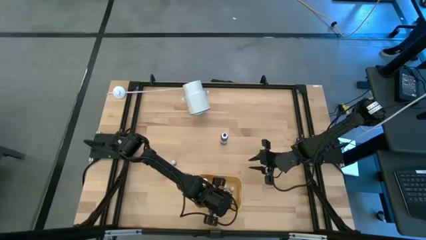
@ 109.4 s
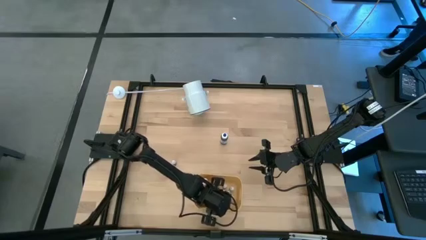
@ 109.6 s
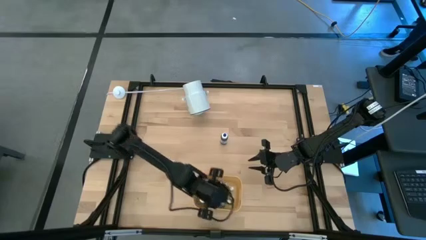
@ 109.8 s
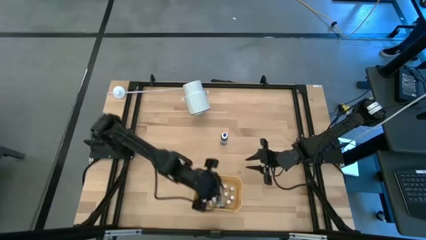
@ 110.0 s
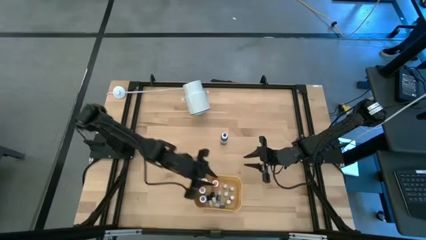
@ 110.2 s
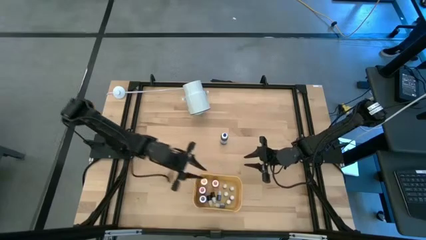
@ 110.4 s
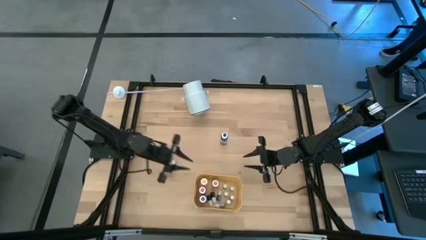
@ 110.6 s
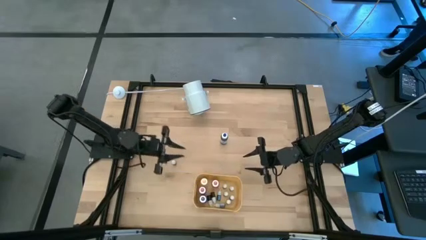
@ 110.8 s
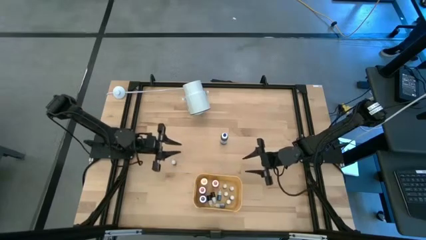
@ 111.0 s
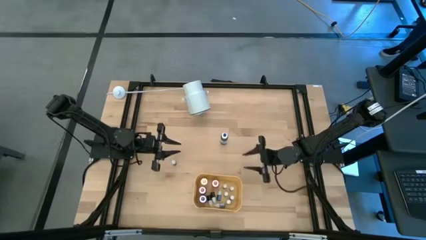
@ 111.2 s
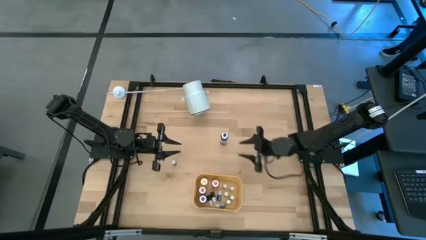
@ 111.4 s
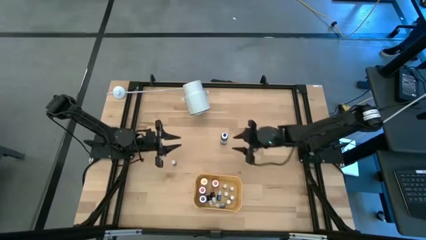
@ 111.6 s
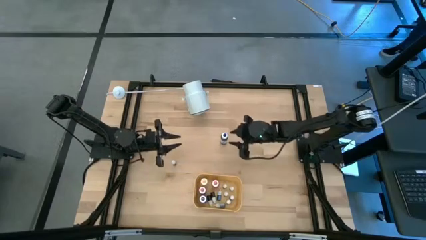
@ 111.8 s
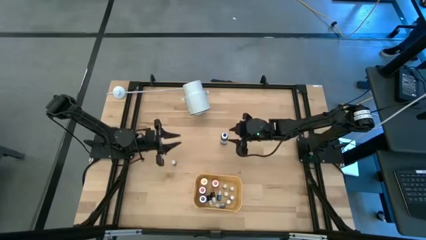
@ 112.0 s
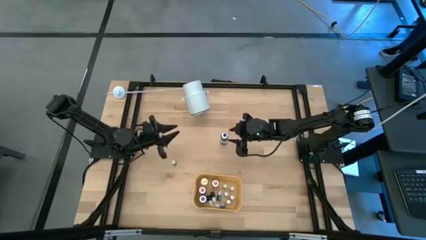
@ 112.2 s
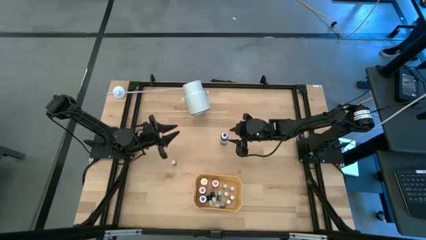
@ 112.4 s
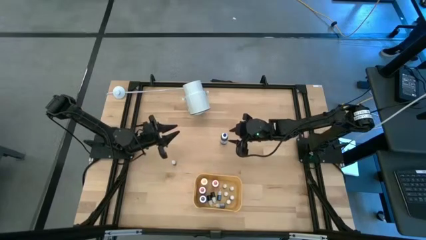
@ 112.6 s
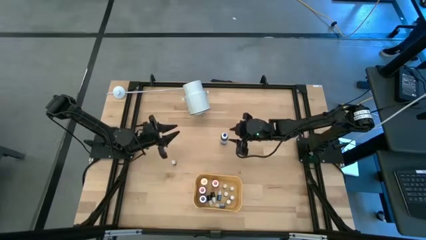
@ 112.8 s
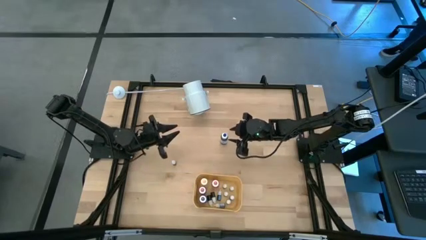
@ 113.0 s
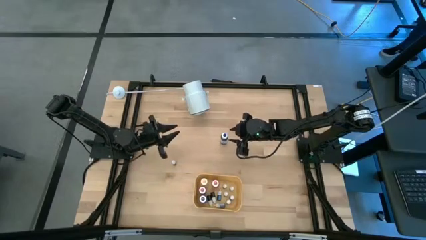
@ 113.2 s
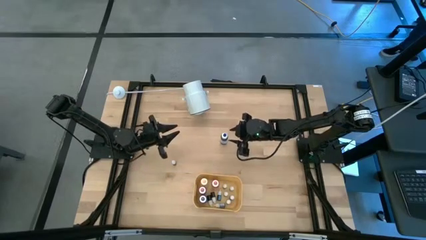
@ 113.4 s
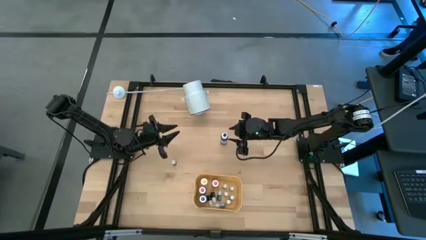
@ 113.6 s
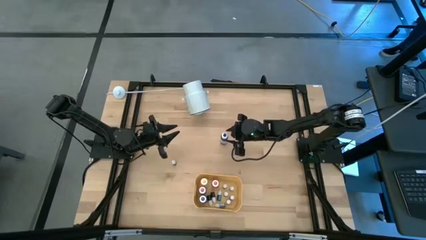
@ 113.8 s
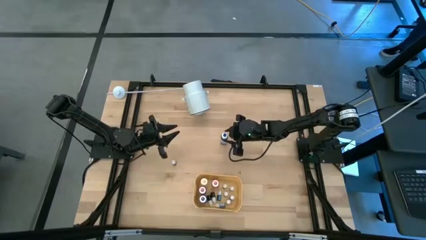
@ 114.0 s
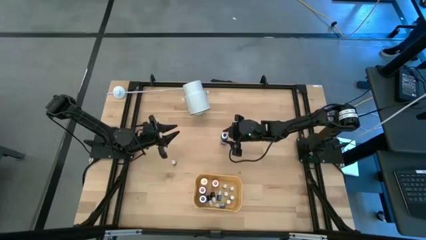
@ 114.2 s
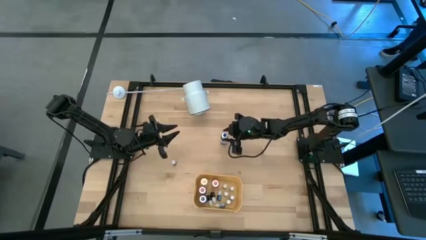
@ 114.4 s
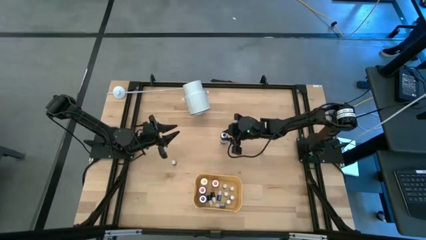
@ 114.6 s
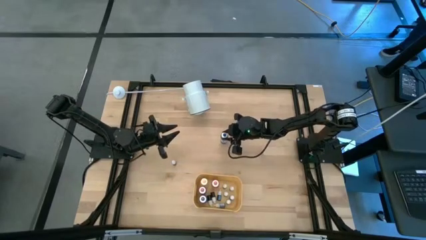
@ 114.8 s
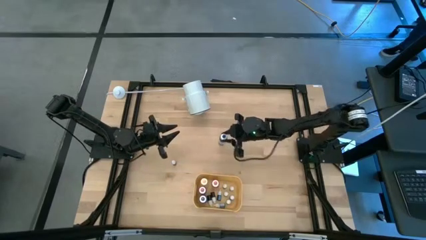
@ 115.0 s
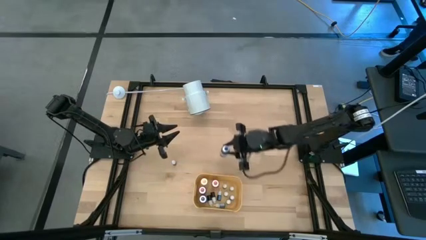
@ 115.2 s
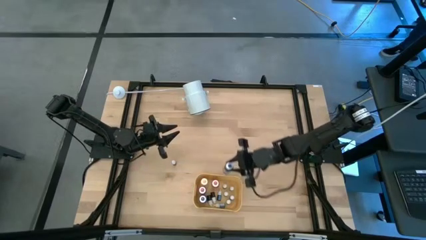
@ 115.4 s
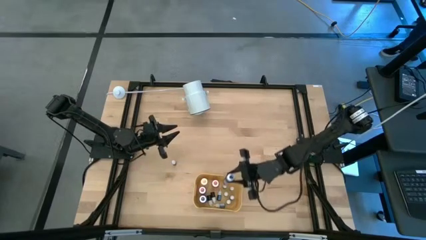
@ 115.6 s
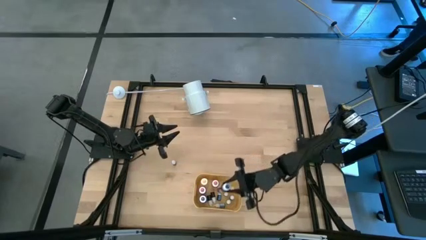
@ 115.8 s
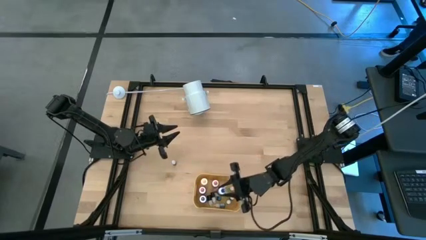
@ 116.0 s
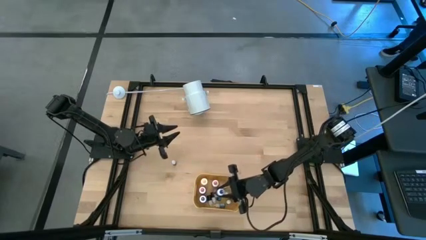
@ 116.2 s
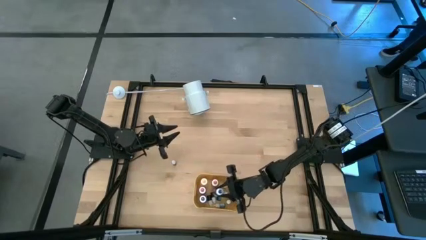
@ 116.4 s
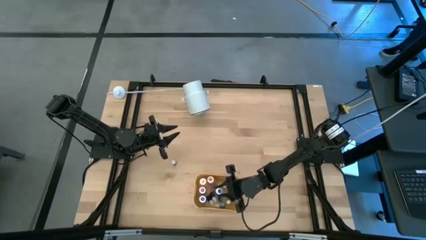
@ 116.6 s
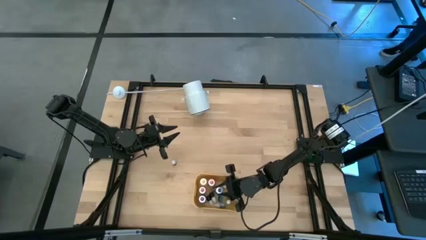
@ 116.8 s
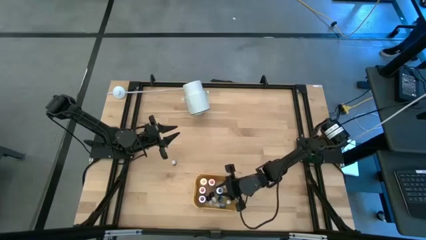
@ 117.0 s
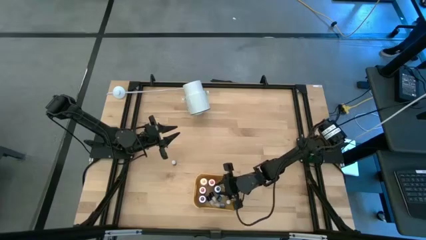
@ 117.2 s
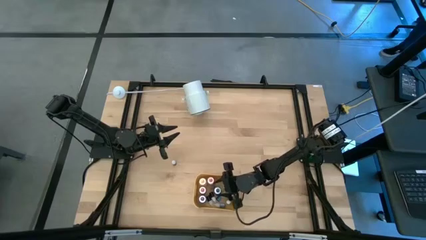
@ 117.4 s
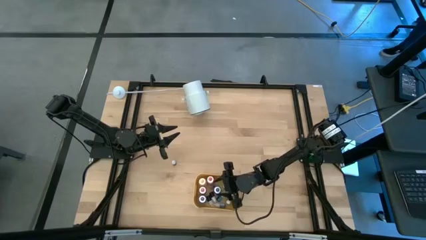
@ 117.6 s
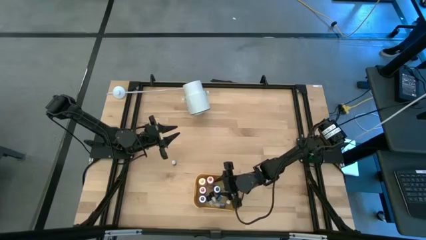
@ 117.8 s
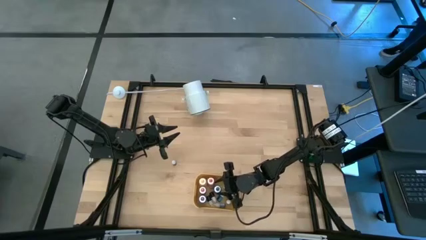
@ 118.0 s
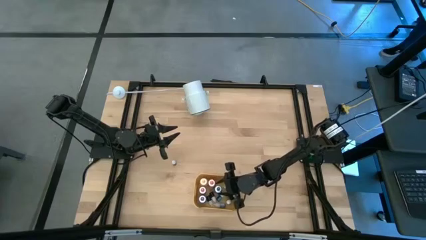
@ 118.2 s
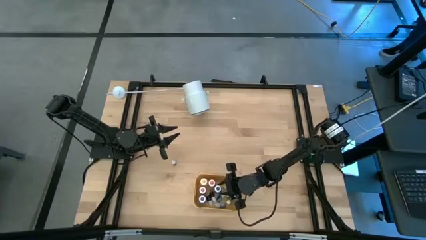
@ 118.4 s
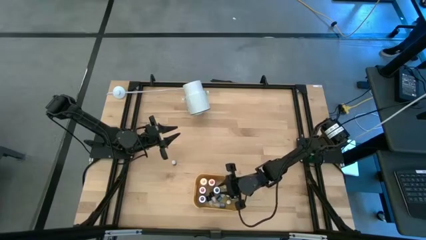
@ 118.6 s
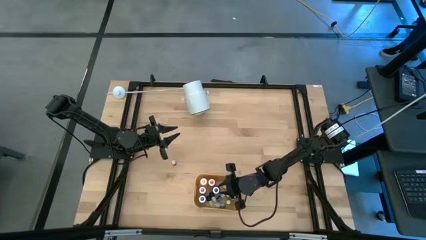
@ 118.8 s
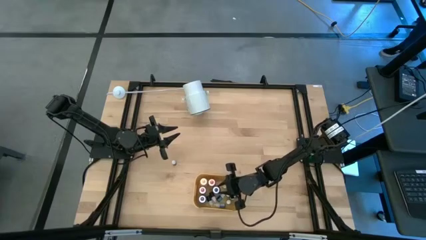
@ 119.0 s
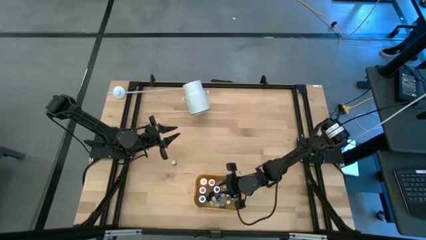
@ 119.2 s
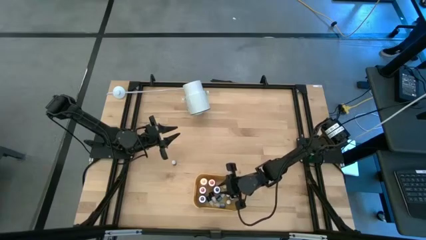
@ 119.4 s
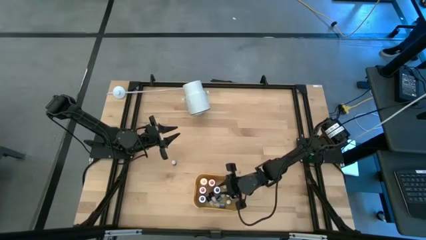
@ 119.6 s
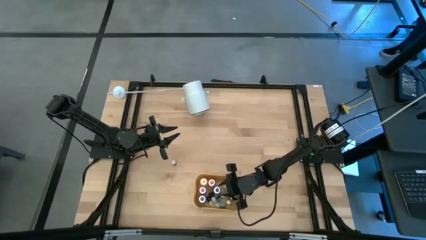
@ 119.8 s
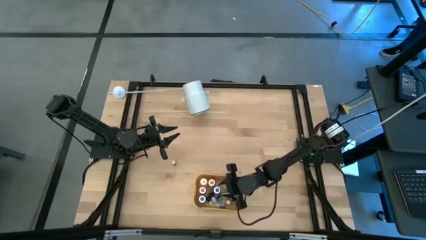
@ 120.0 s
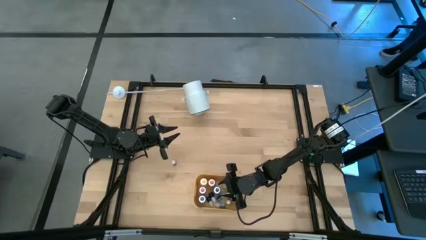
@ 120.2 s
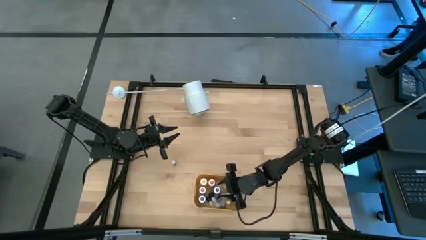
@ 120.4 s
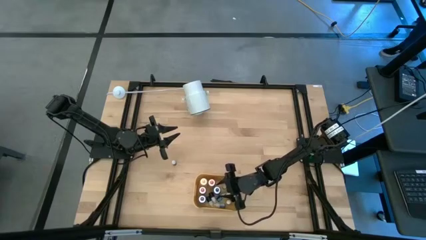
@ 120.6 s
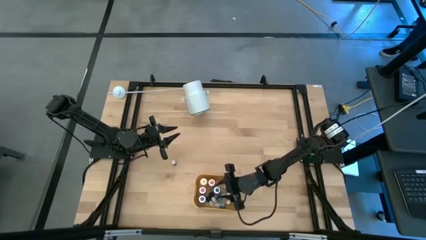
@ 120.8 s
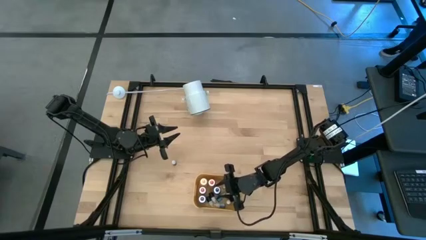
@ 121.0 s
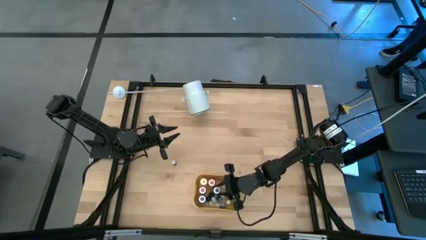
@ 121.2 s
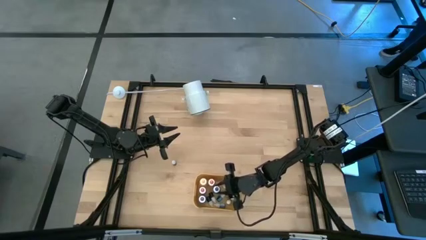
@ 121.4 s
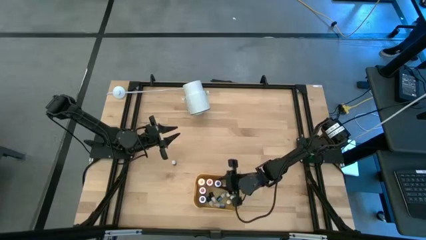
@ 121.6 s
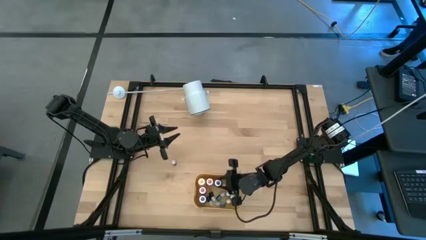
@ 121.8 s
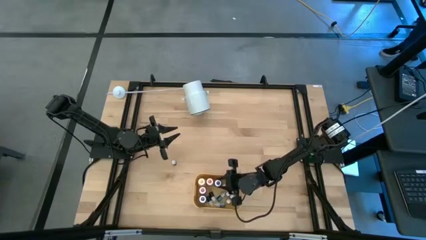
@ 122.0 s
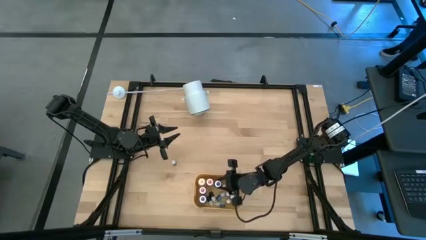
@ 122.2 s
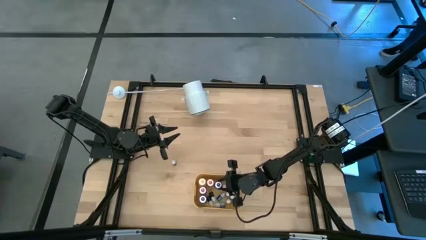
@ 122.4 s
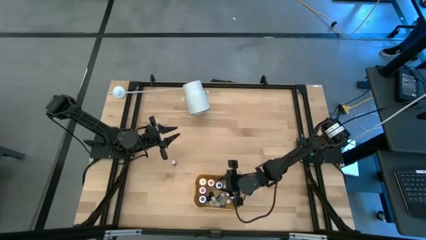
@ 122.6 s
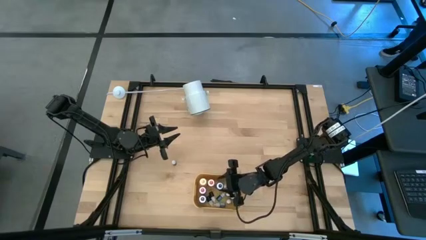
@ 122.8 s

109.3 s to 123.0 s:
Task: Pick & Place food coloring
Put the big blue food coloring bottle into the yellow bin

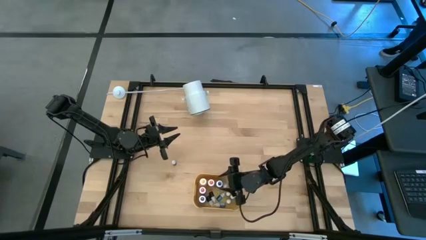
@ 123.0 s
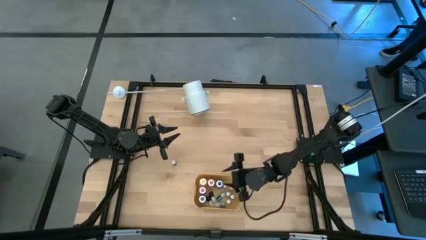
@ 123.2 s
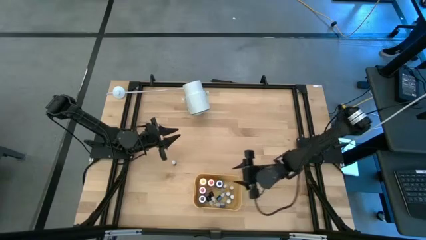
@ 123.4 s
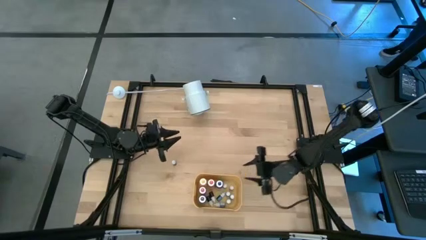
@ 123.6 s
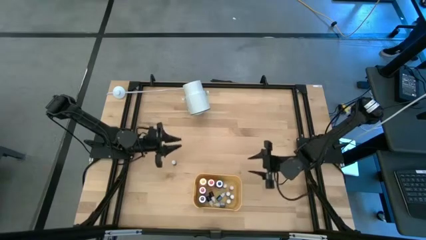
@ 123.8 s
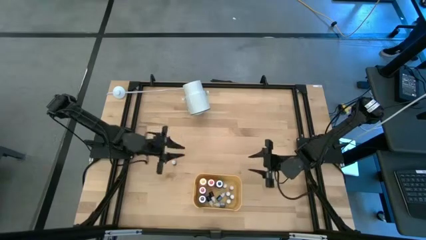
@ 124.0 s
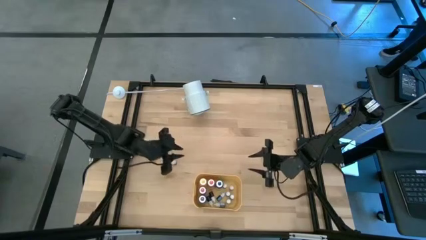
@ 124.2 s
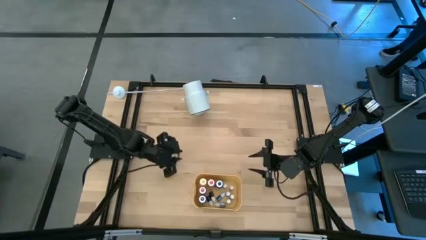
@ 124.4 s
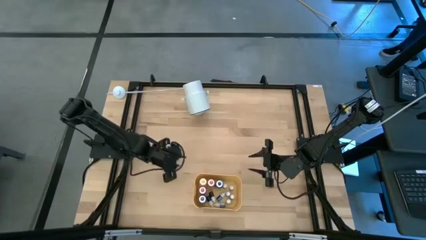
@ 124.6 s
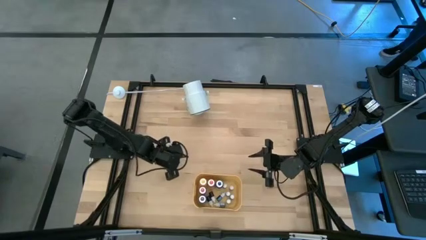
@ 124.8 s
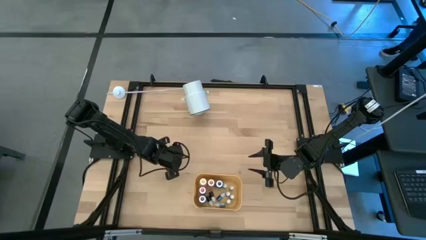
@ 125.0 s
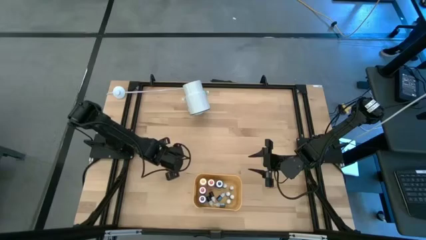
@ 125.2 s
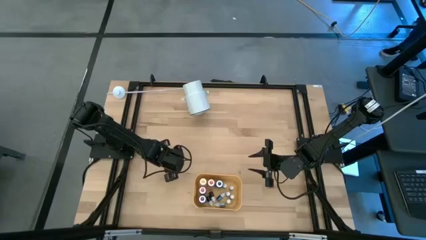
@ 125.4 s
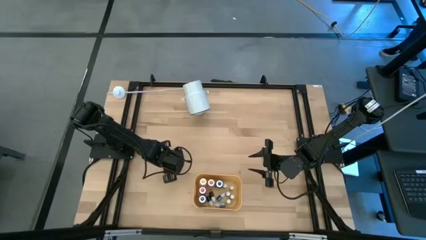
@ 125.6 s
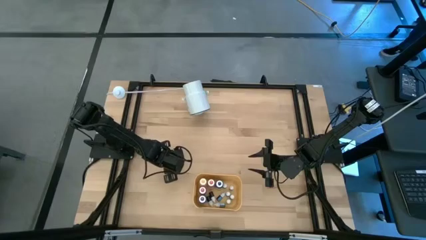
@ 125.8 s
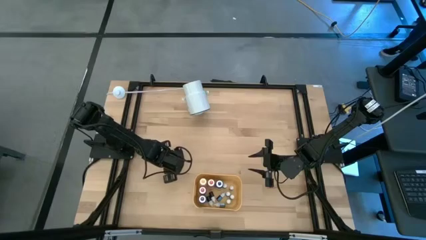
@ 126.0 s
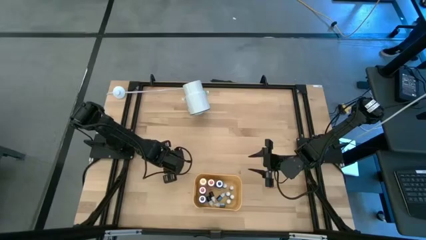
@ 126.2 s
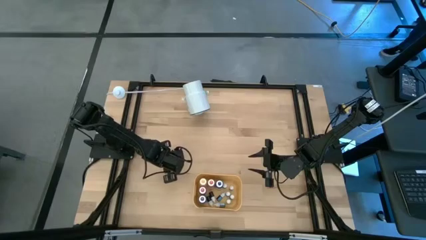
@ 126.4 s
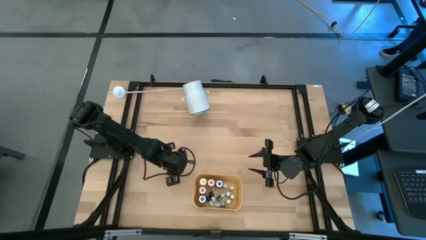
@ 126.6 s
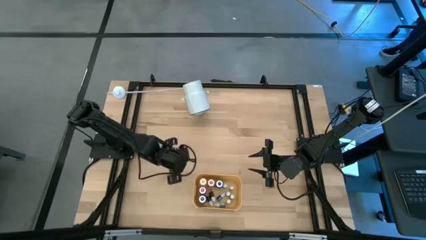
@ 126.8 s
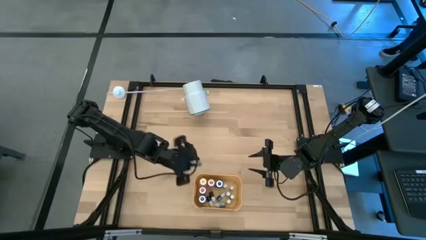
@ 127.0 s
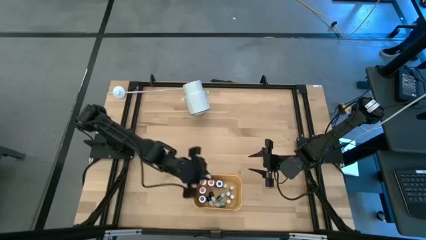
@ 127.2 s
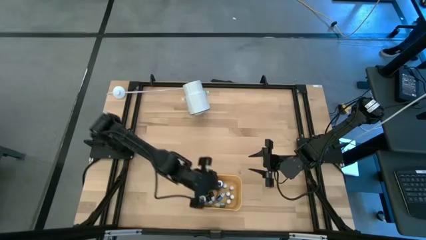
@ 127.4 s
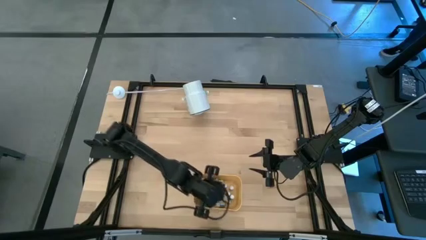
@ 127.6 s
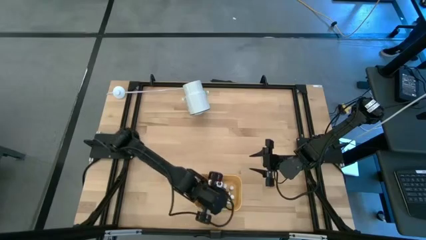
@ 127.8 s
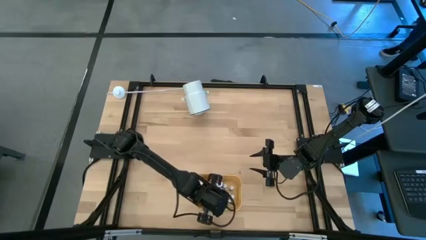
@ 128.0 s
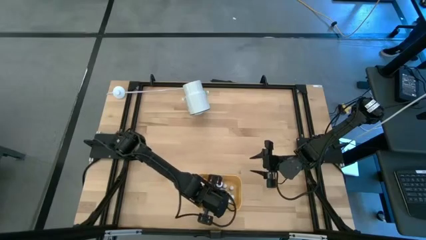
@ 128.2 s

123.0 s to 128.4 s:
Put the small red food coloring bottle into the yellow bin
